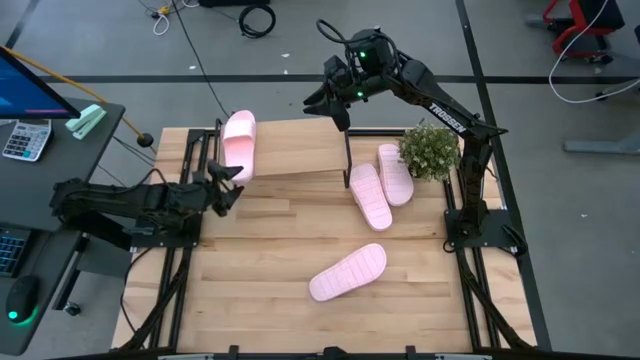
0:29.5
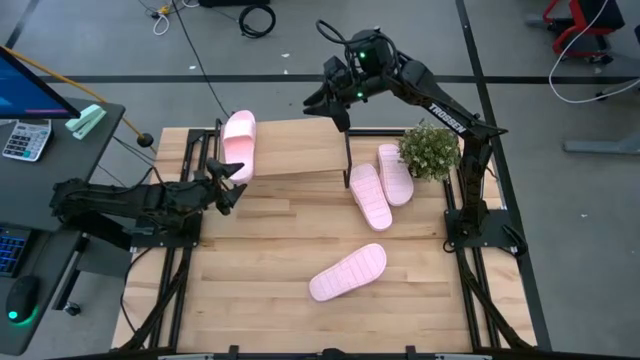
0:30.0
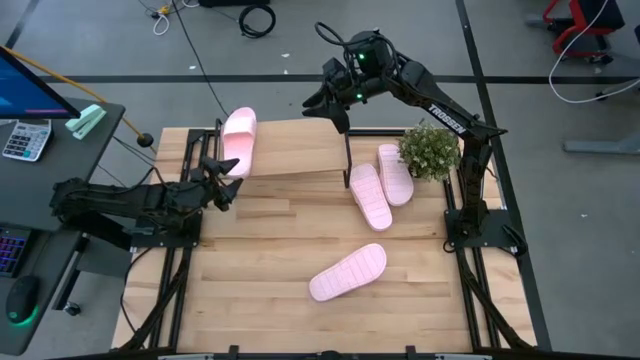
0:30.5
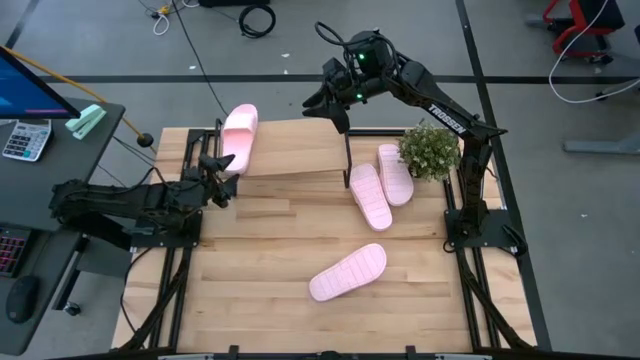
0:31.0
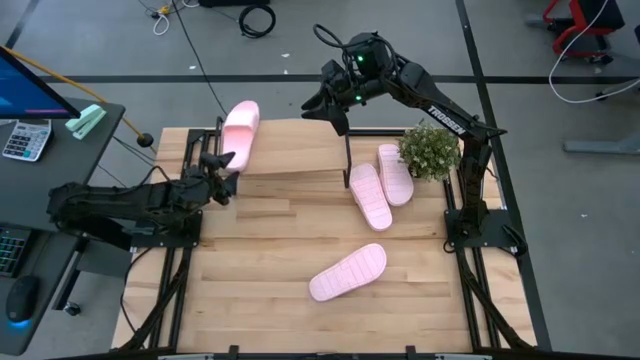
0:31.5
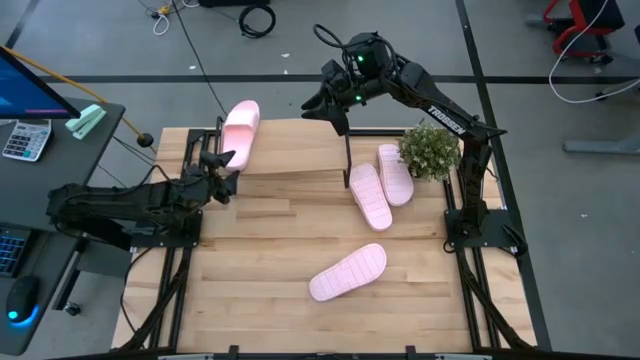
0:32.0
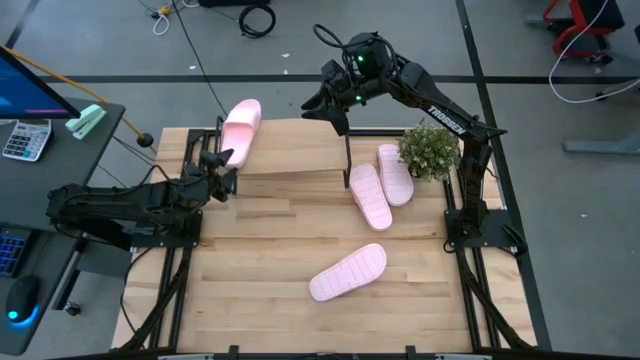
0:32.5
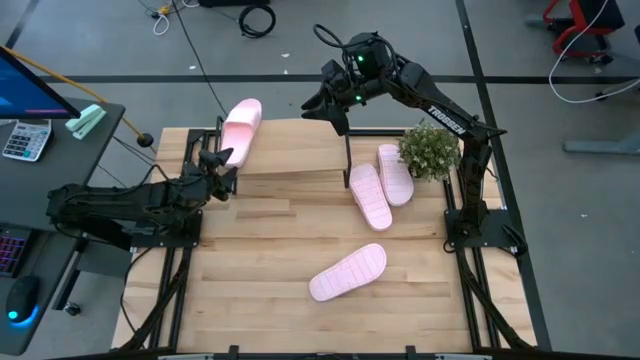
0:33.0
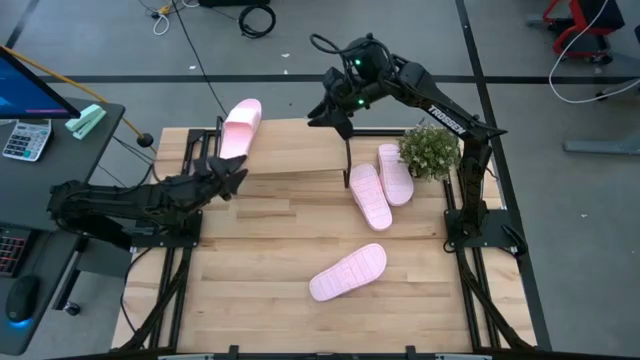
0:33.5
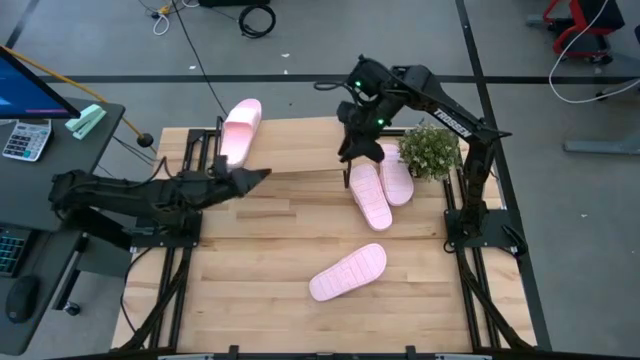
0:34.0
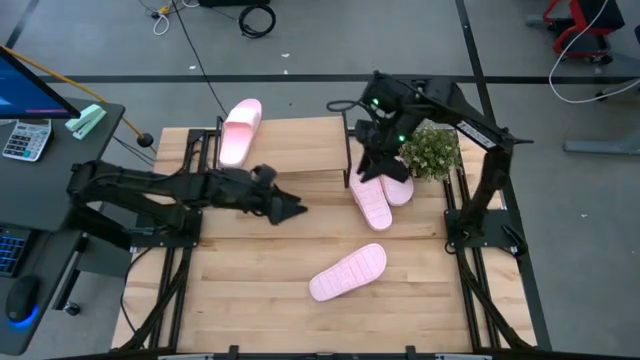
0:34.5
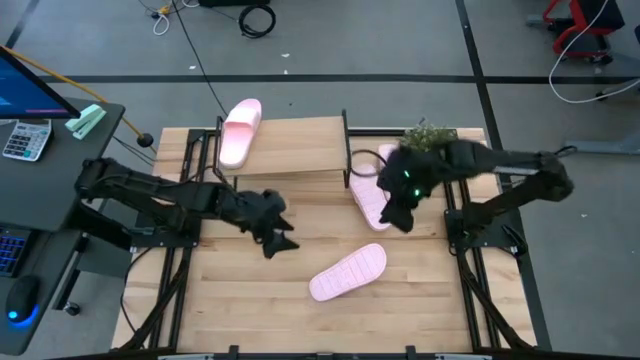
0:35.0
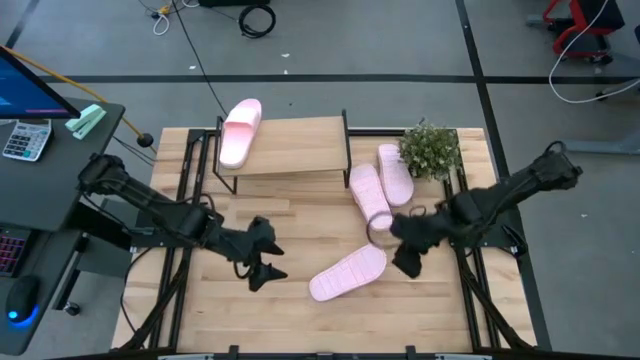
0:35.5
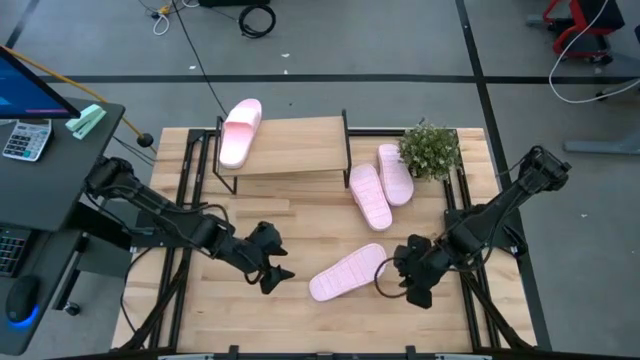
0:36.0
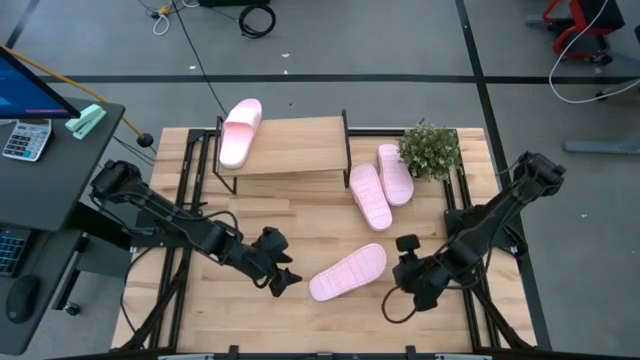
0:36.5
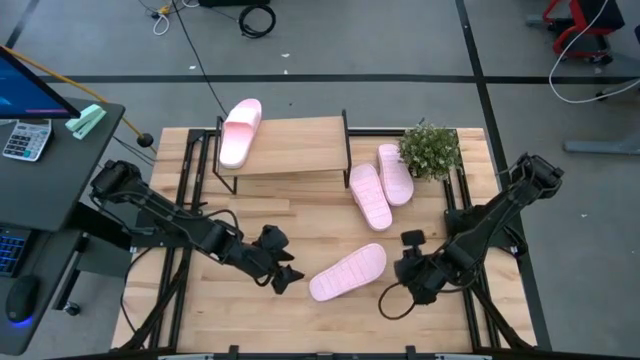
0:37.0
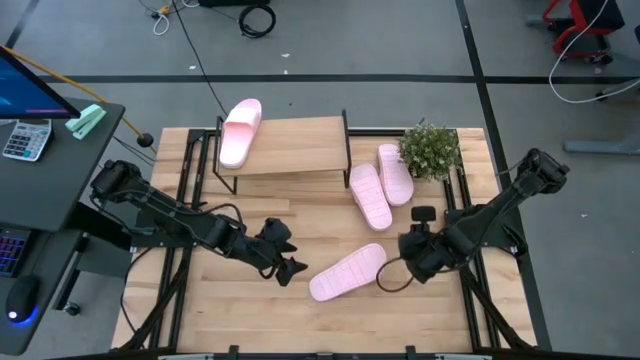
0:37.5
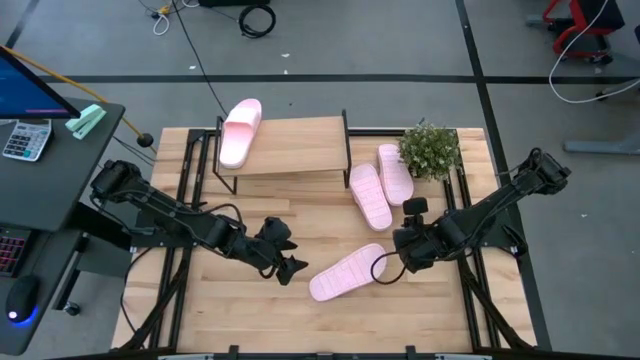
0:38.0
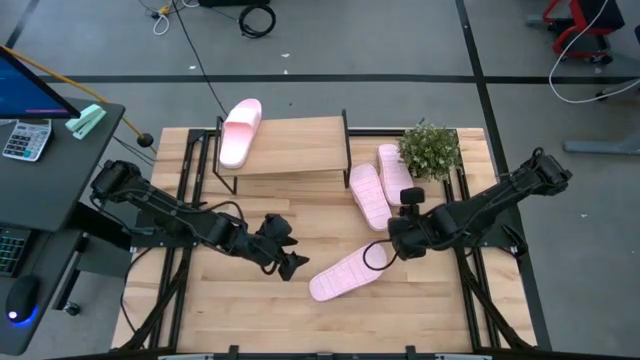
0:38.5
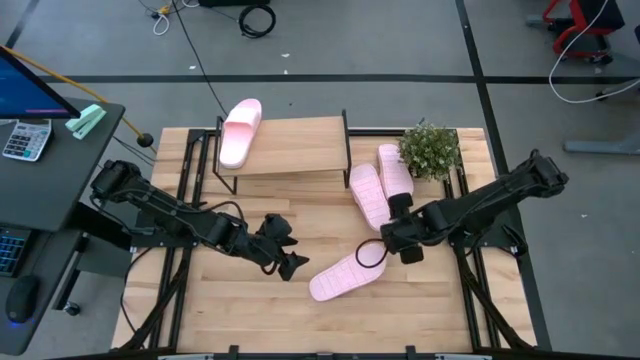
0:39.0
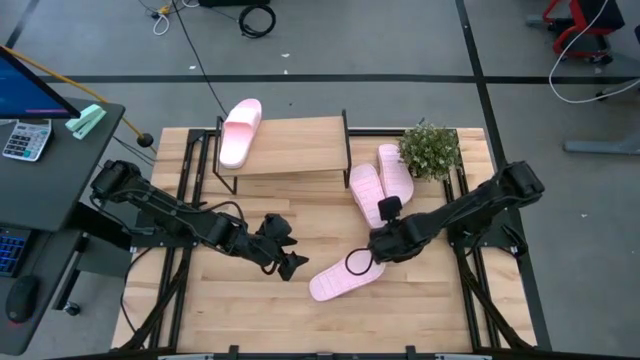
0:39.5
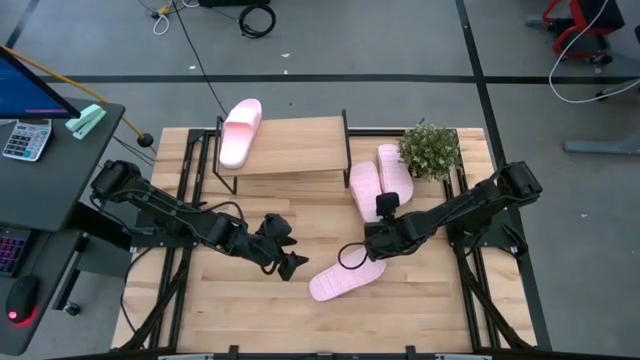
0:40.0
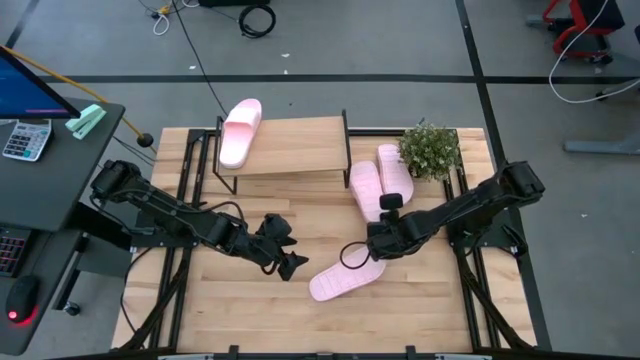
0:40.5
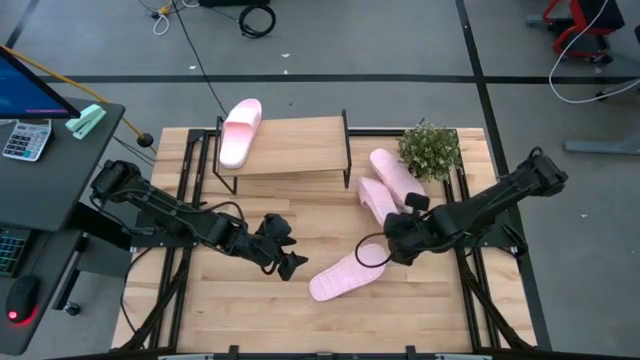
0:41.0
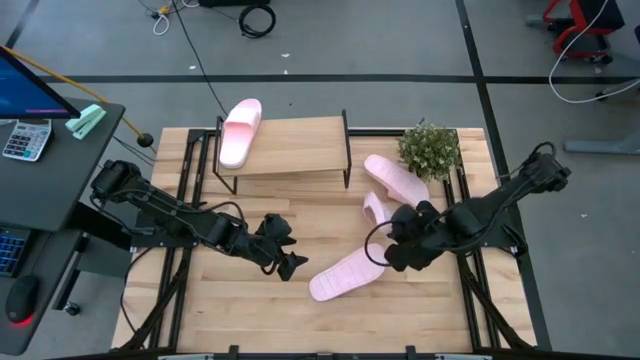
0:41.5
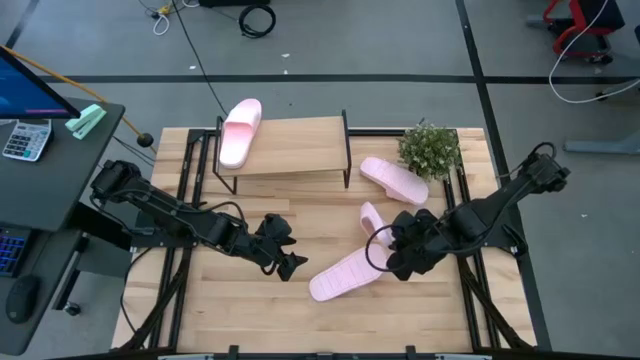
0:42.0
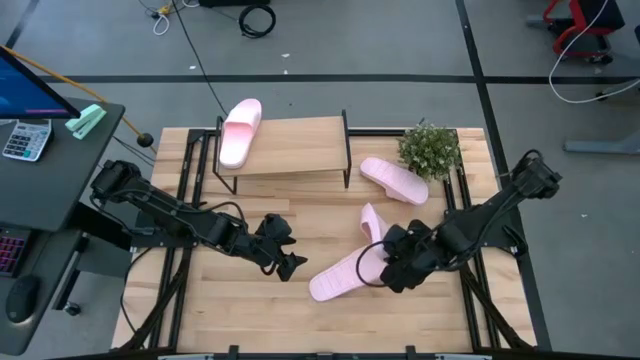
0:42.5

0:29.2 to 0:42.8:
Task: Pick and place slides into the shelf
Put the pink slides on the shelf

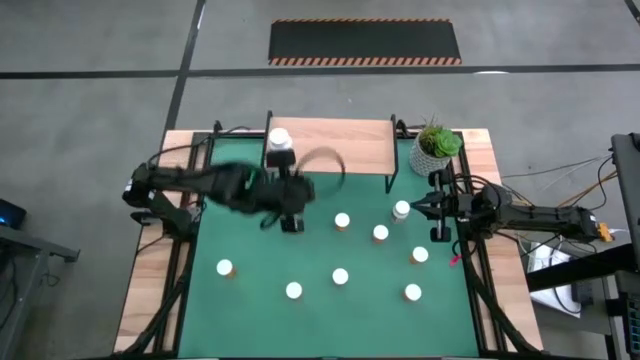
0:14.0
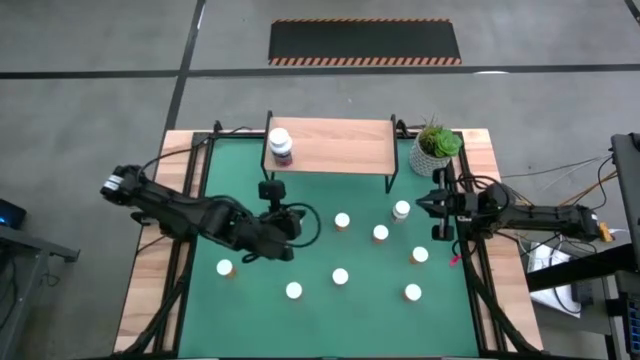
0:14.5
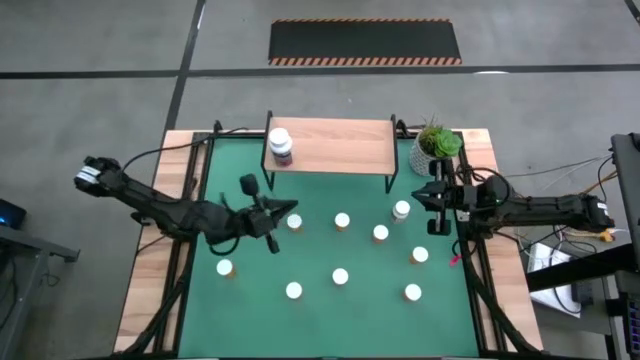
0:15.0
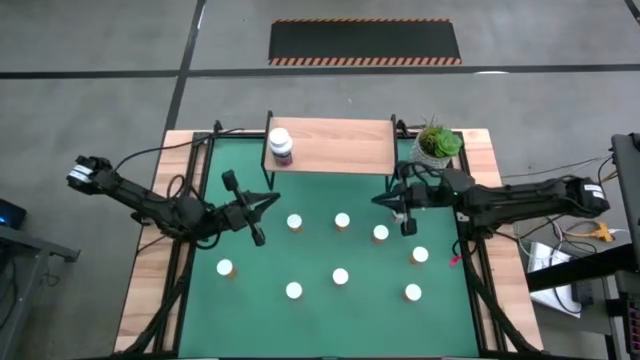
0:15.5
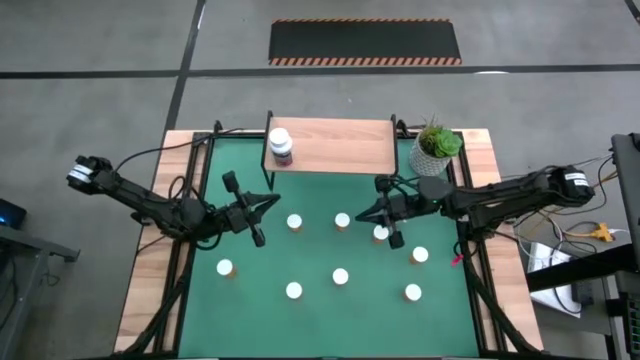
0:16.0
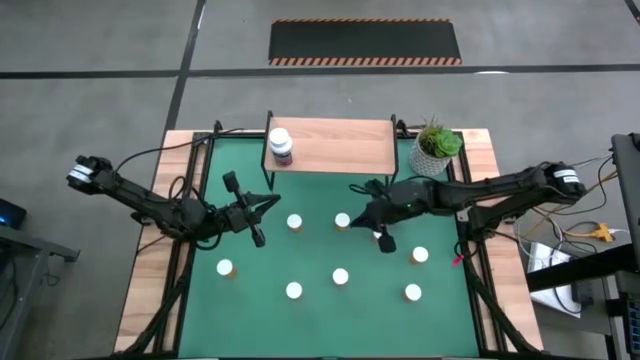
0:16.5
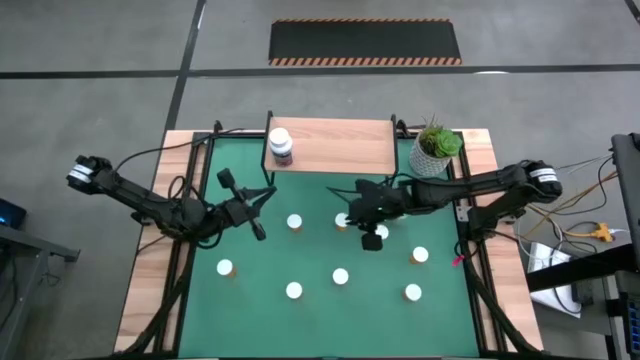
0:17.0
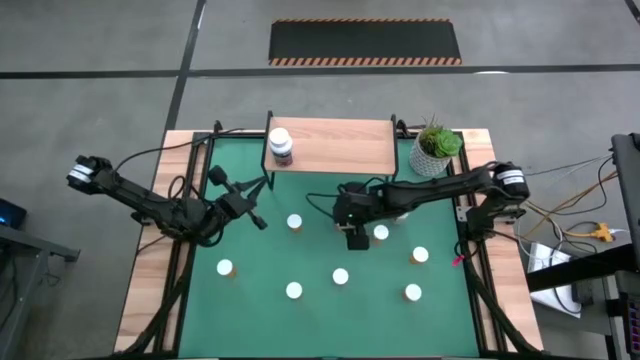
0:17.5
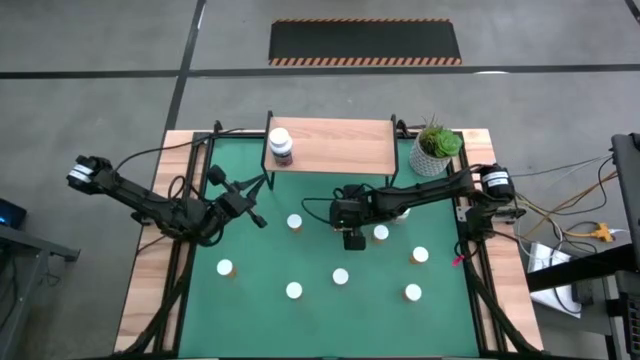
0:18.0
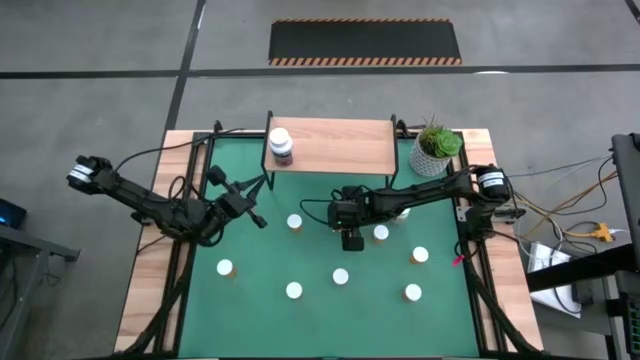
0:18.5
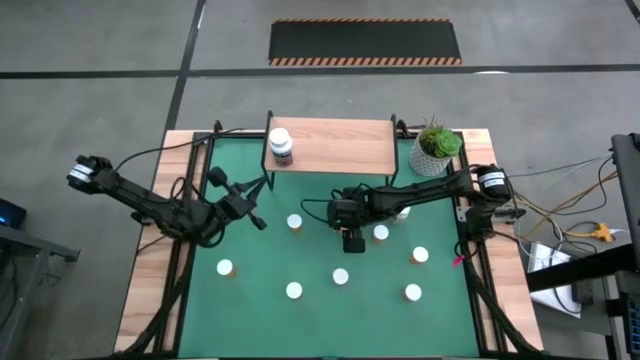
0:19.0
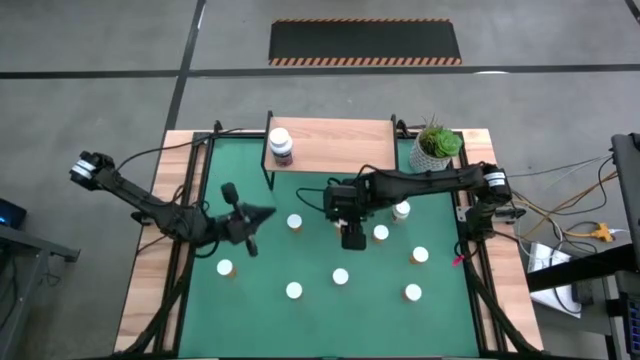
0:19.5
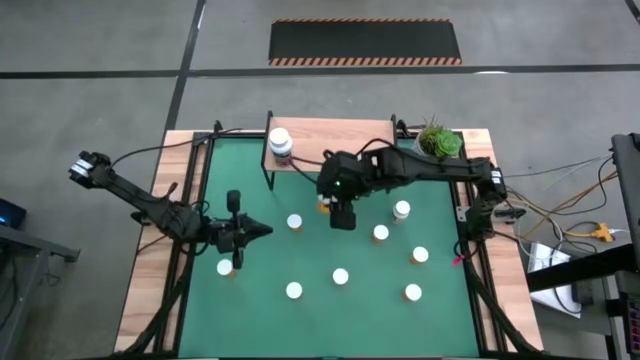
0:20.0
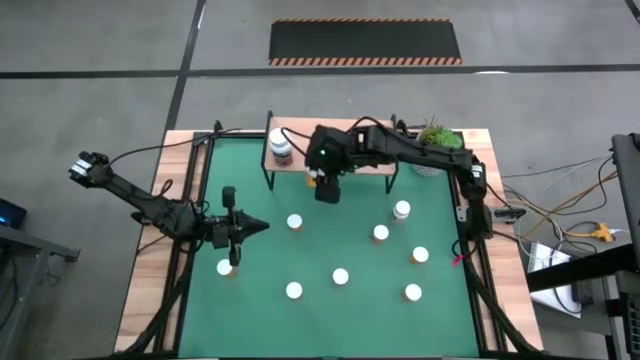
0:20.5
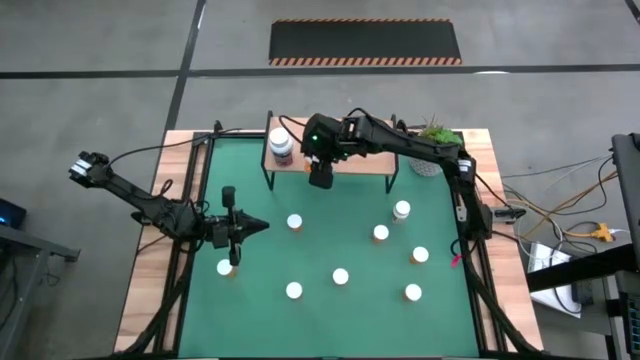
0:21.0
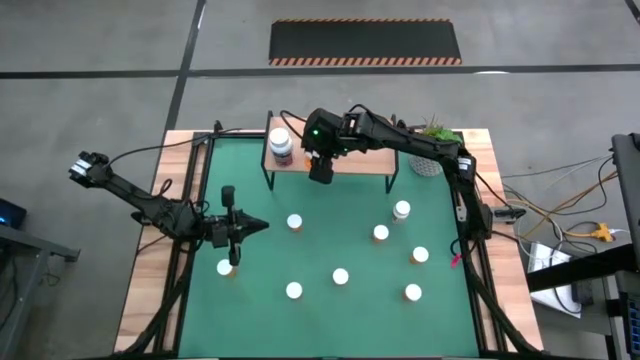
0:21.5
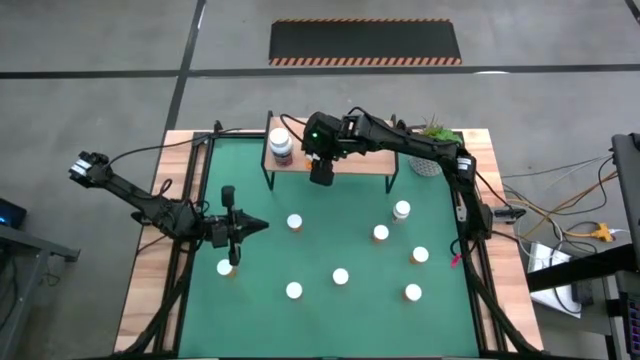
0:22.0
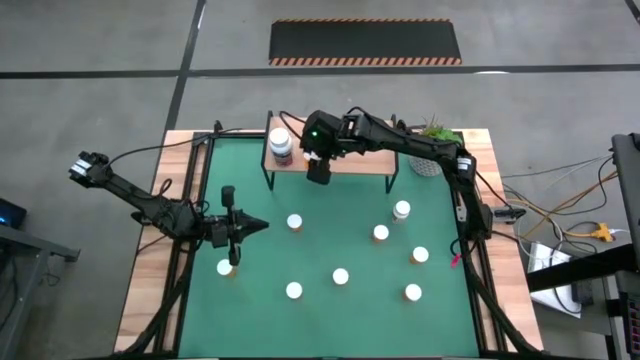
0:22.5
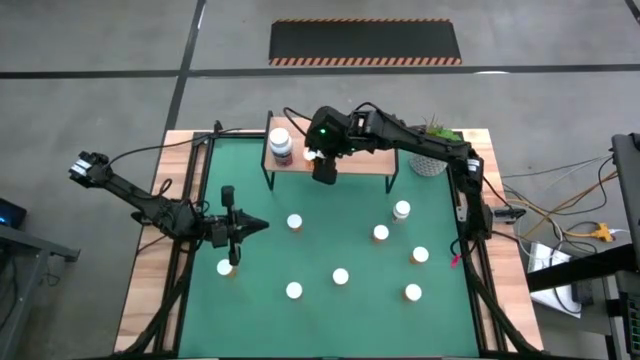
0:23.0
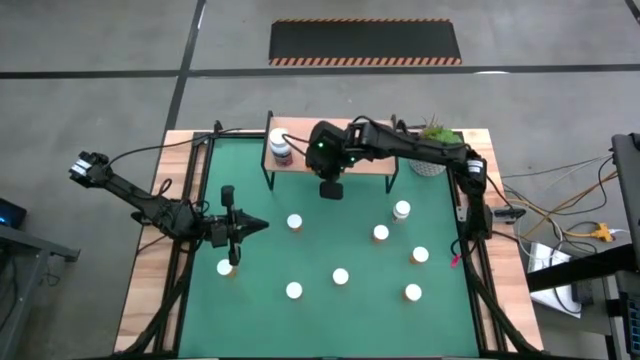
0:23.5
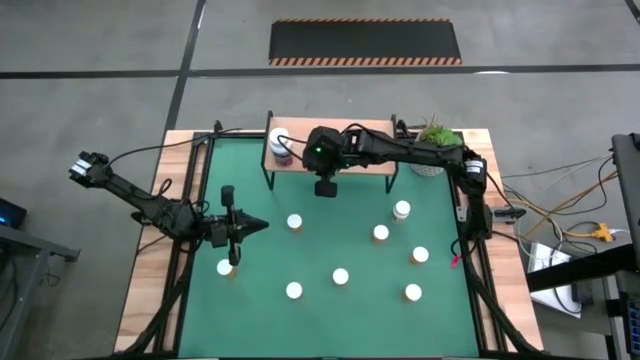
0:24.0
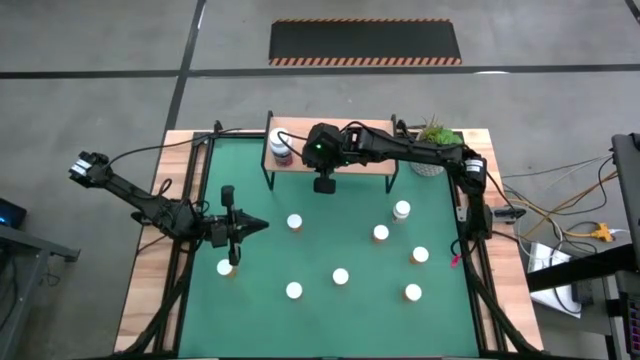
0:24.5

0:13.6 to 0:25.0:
Task: Pick and place medicine bottles onto shelf by color
Put the orange pill bottle on the shelf
